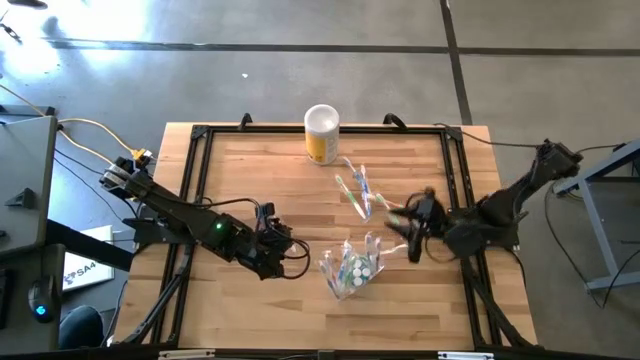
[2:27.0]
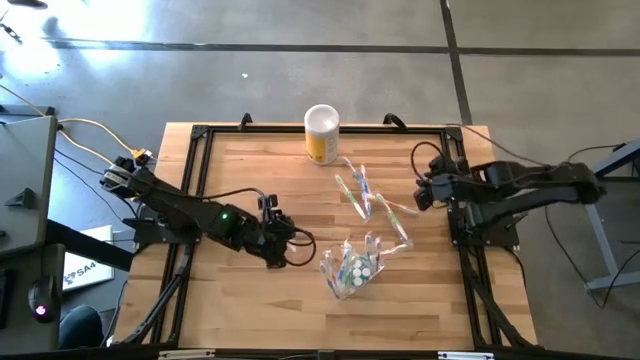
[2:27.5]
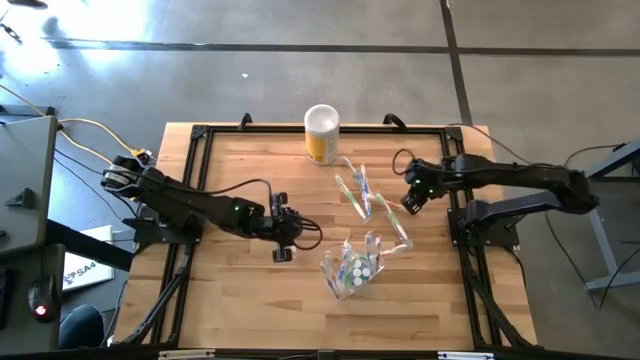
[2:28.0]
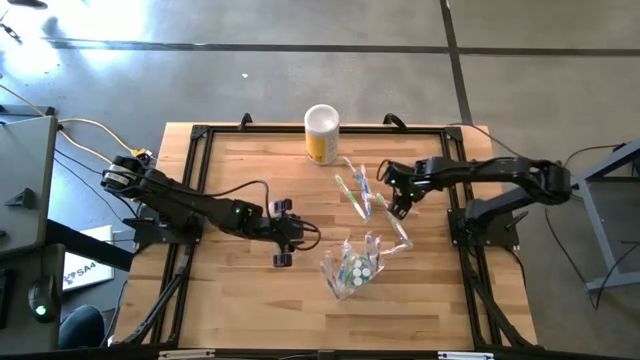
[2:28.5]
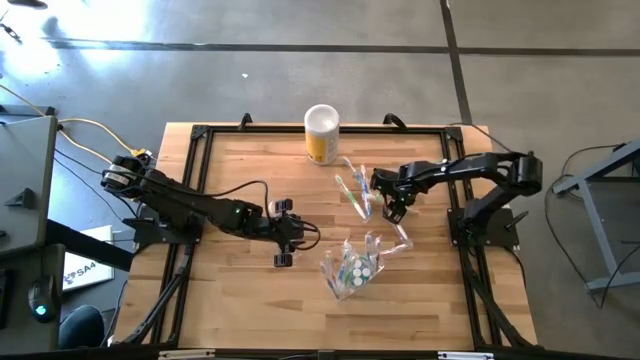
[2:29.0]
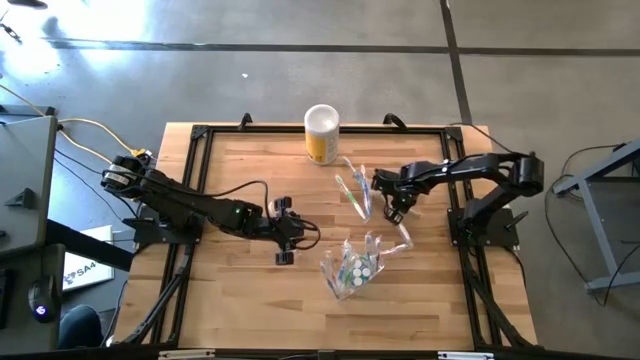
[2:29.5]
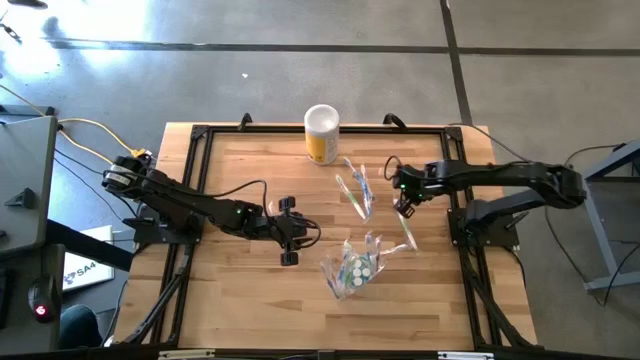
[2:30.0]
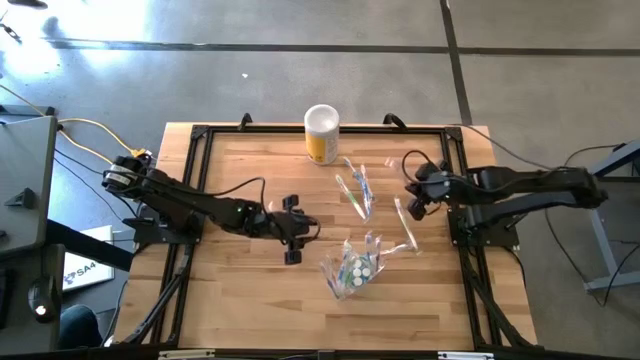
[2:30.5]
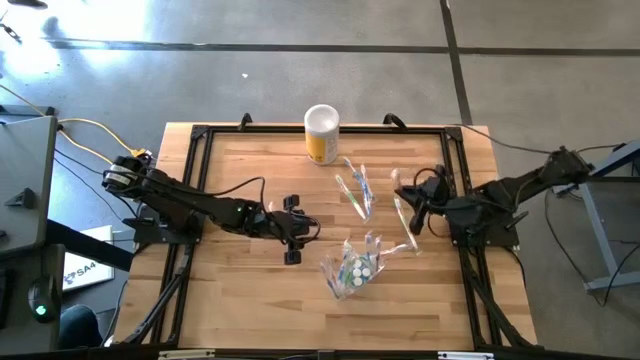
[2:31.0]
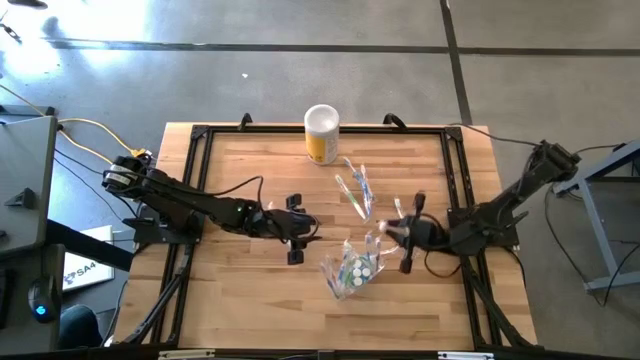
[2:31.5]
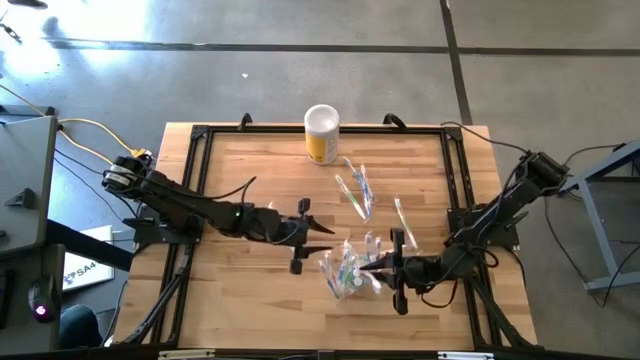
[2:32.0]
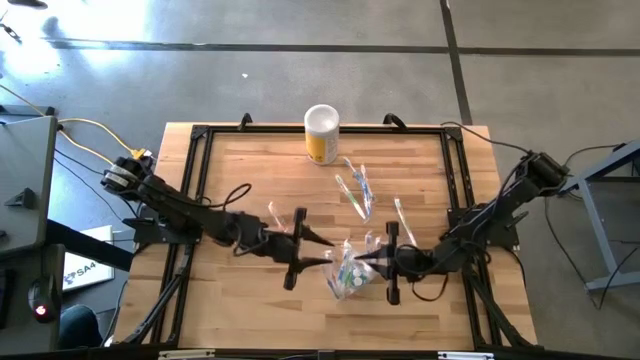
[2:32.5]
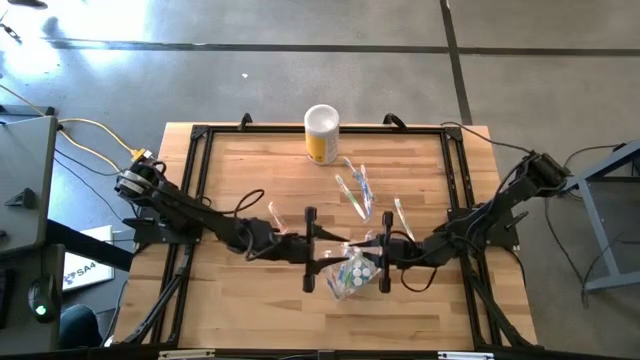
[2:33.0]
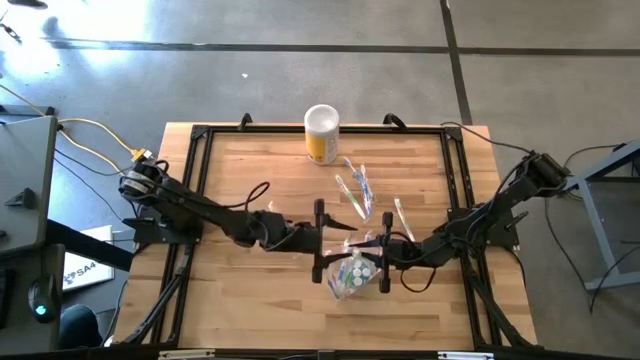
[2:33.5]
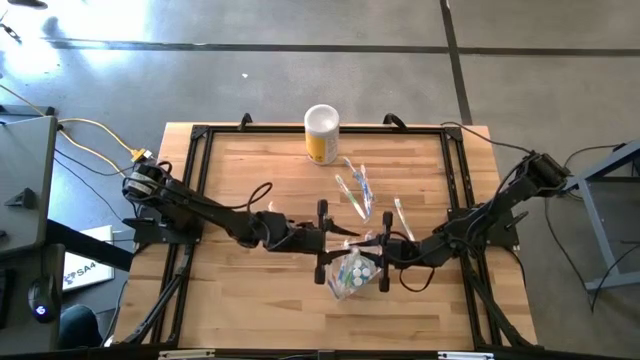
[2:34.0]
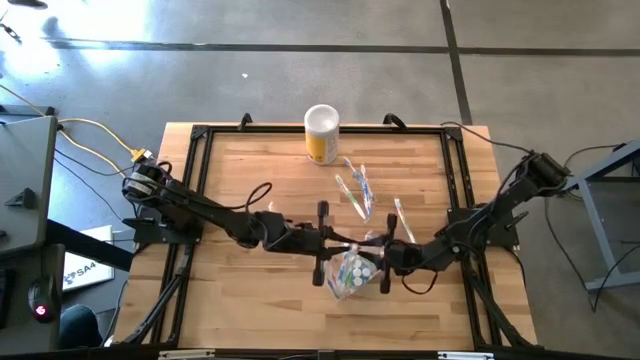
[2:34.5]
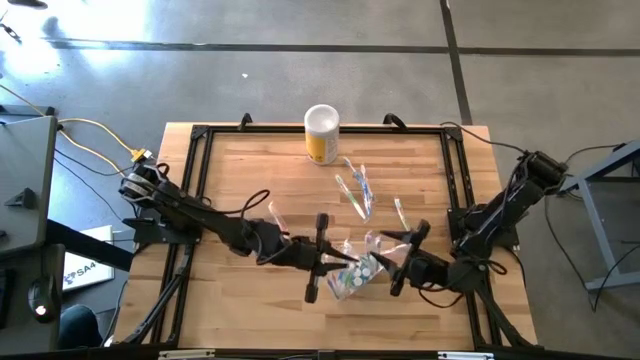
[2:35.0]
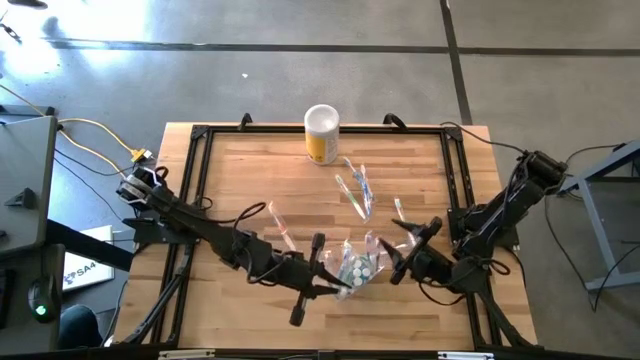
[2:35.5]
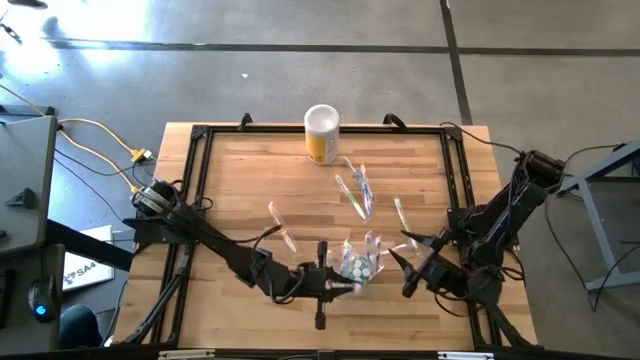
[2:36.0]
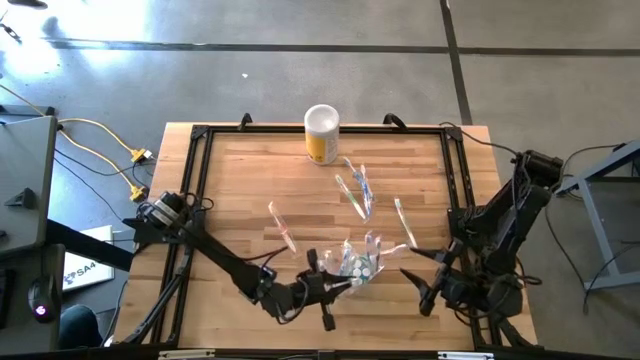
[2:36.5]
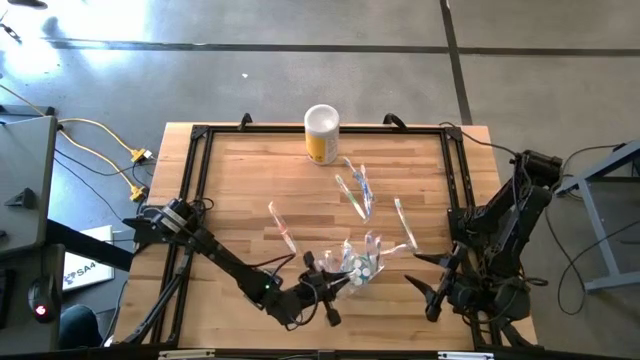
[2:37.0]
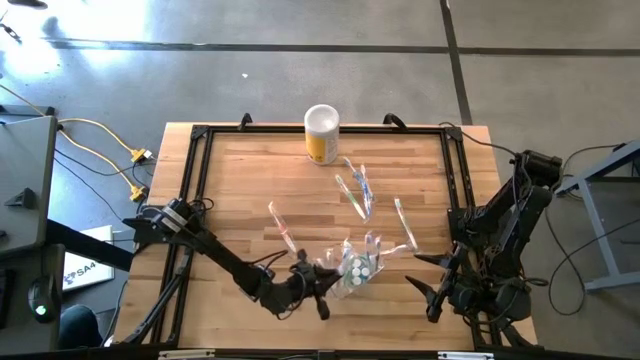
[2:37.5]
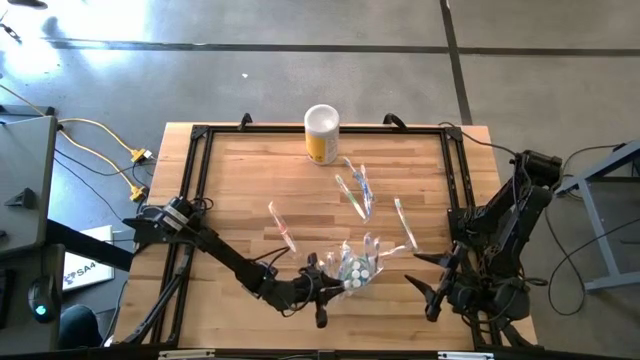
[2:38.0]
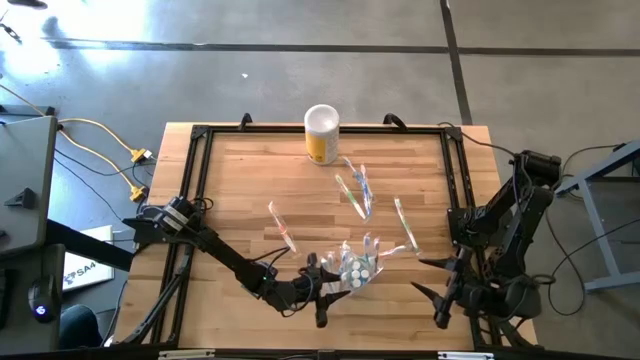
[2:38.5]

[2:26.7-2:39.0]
Task: Pick & Place toothbrushing station
Put the orange toothbrush in the transparent organizer

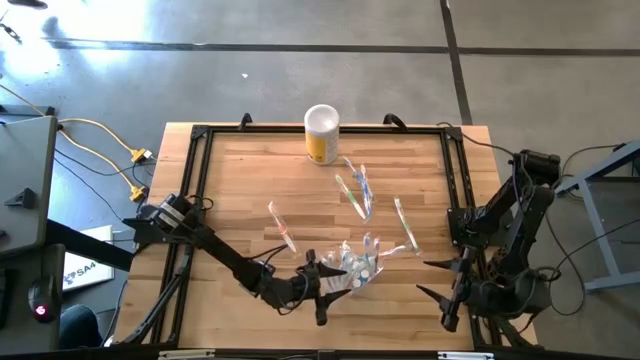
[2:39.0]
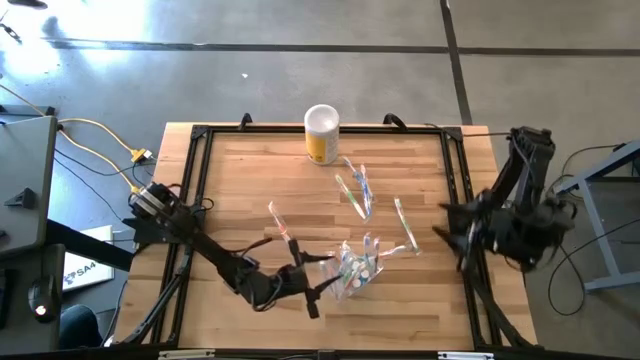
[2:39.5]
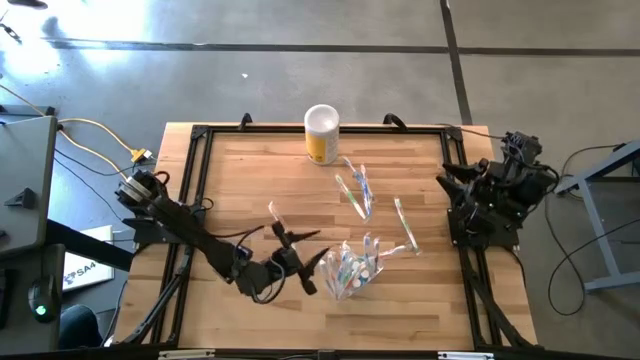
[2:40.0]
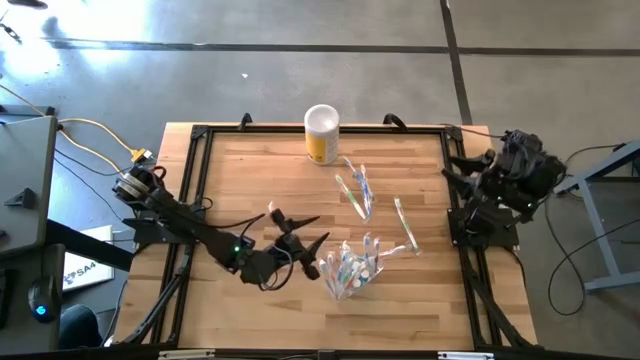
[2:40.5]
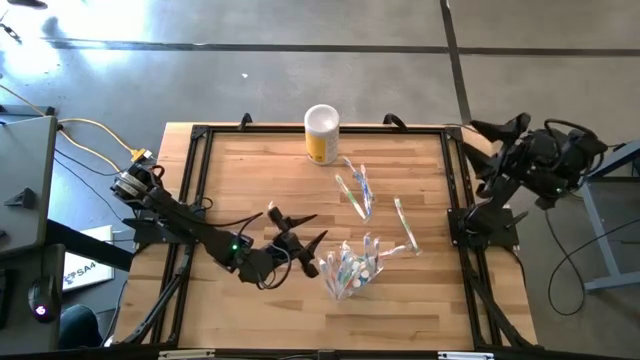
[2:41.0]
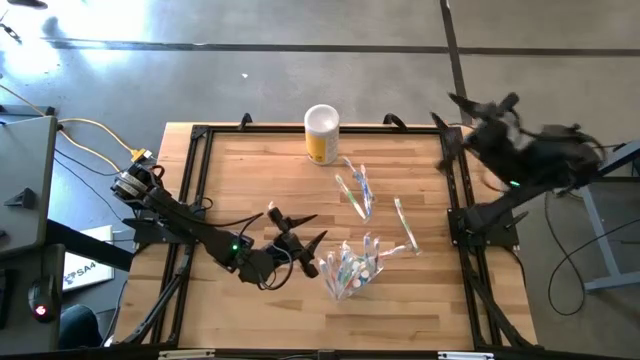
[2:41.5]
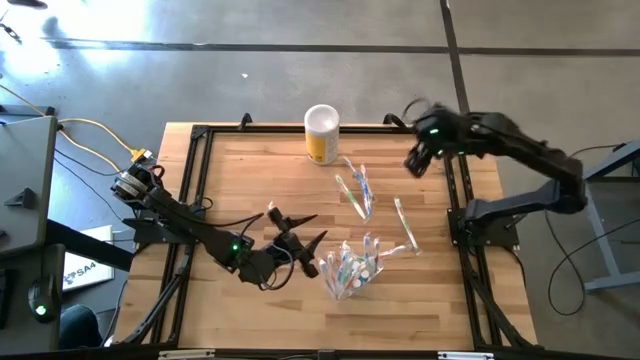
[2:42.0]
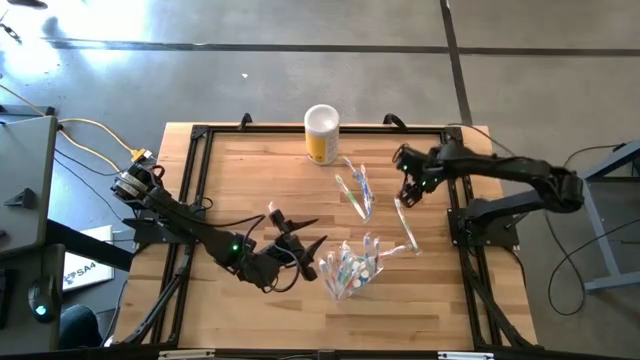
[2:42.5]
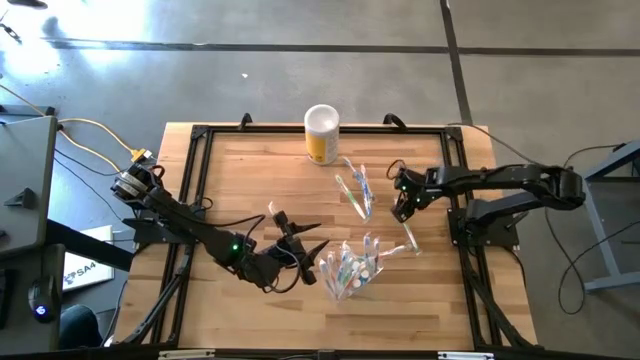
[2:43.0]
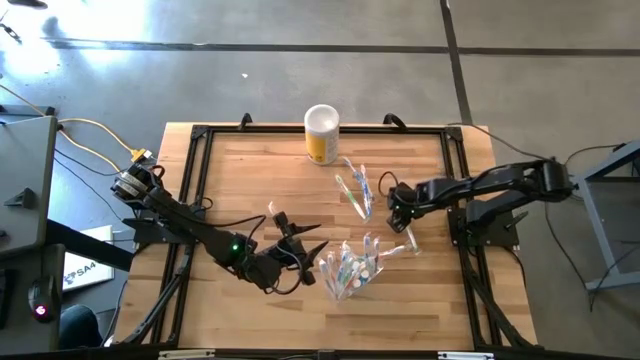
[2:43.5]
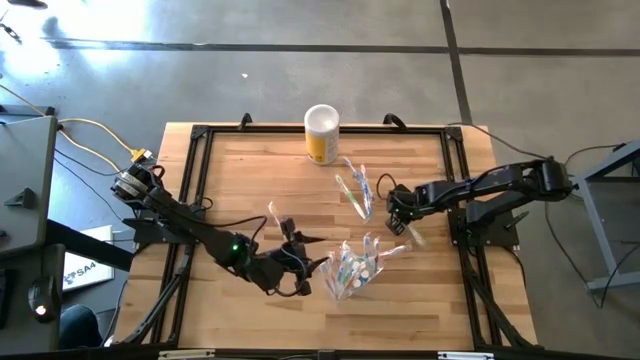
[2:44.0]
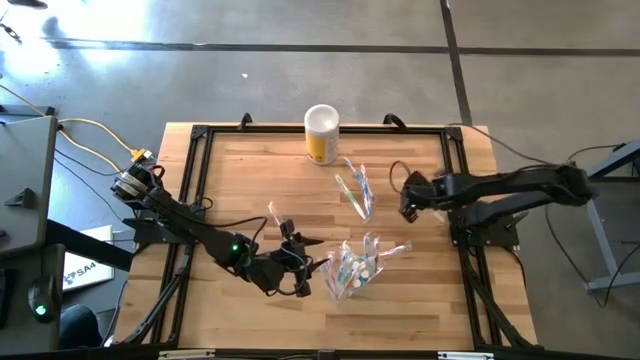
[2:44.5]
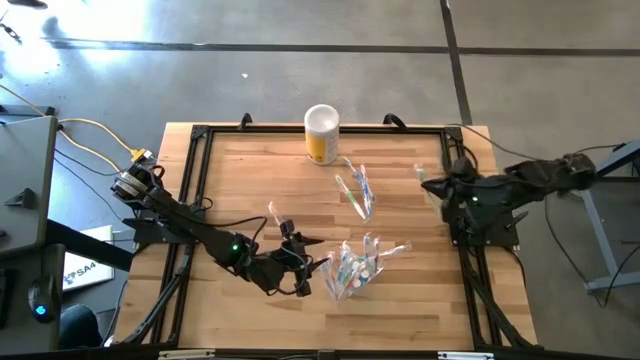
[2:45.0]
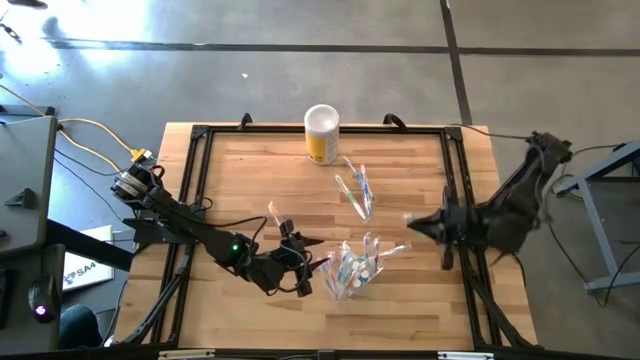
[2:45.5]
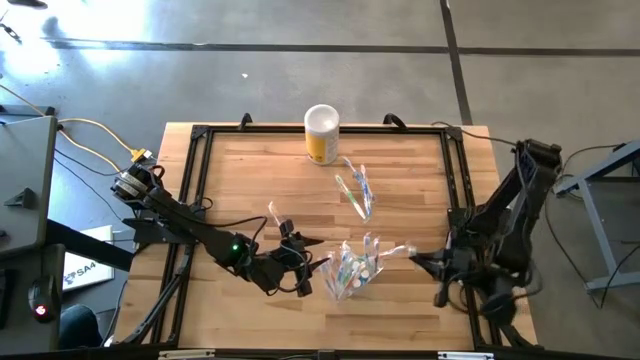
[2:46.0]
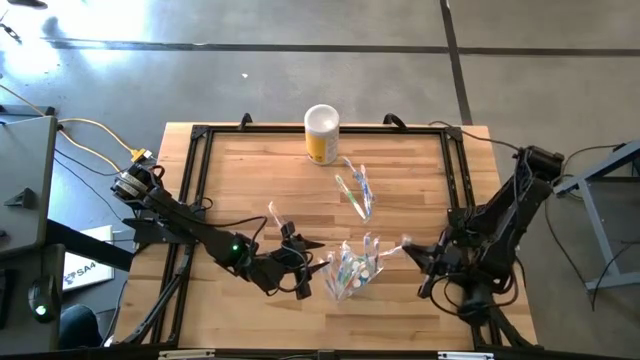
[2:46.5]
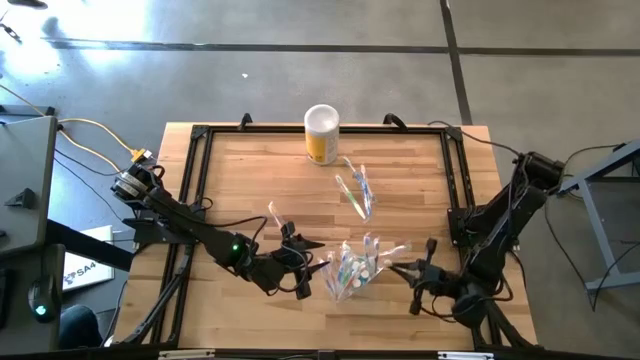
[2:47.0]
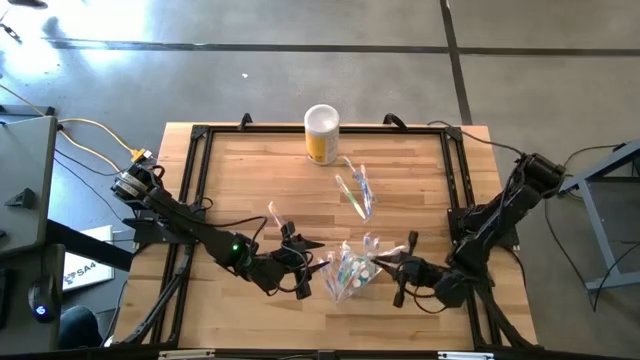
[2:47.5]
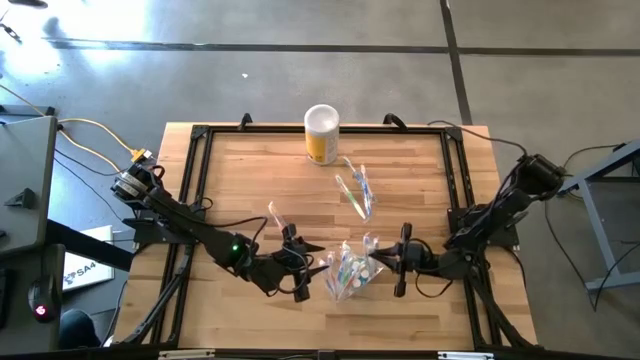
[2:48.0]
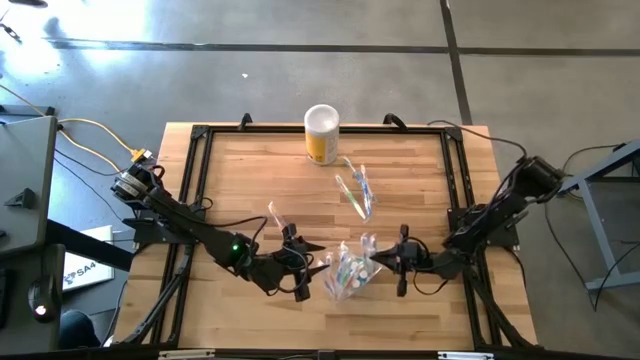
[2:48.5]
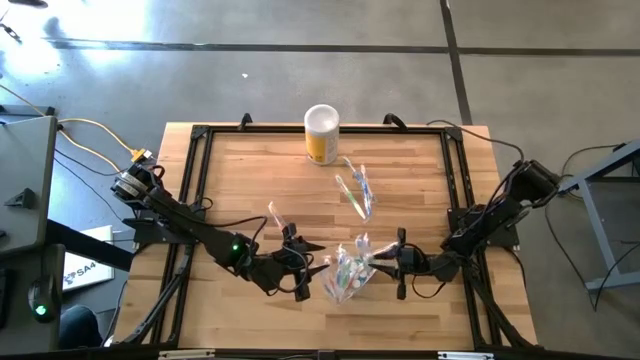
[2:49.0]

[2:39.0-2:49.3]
Put the green toothbrush in the transparent organizer
